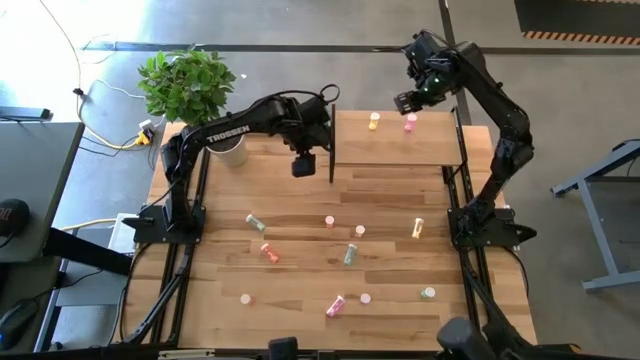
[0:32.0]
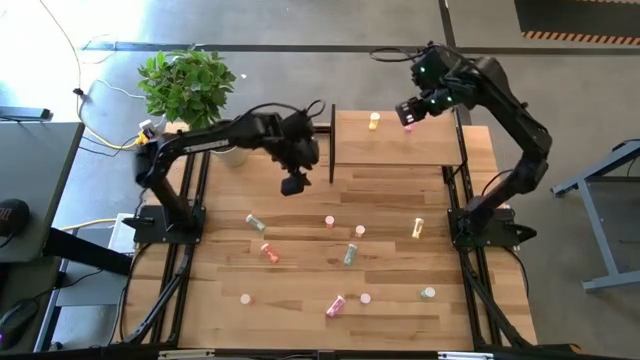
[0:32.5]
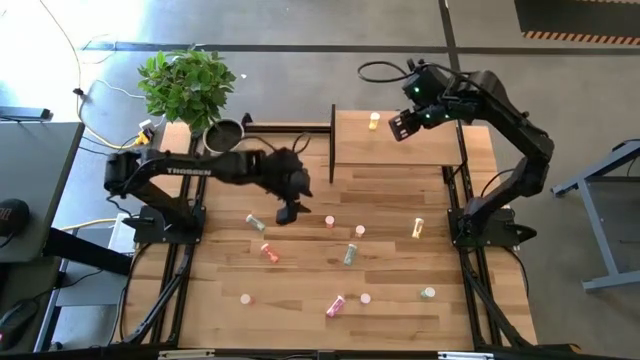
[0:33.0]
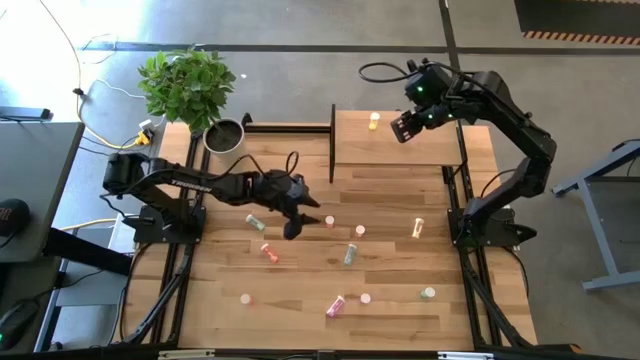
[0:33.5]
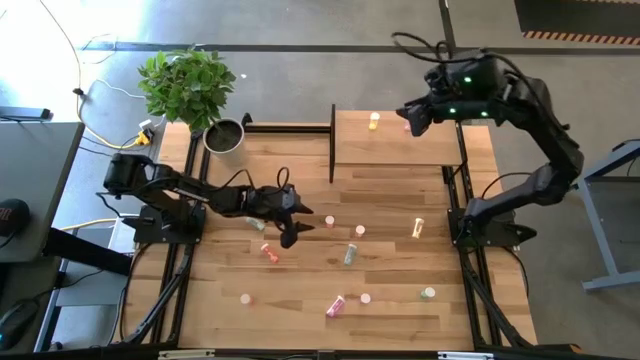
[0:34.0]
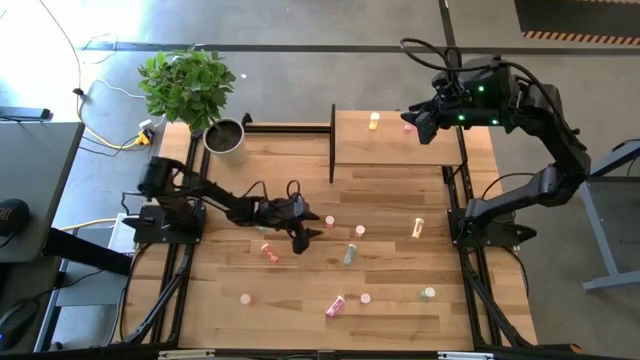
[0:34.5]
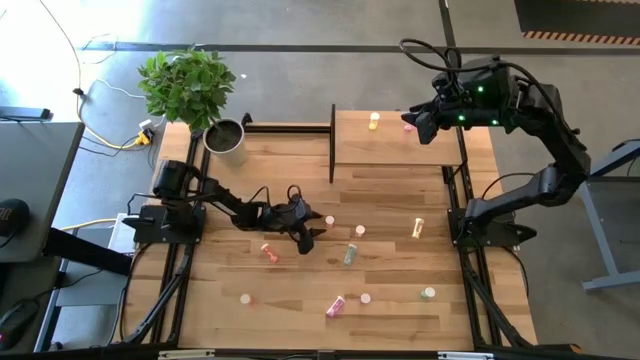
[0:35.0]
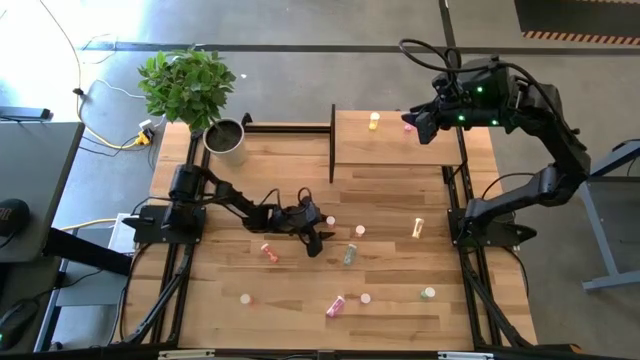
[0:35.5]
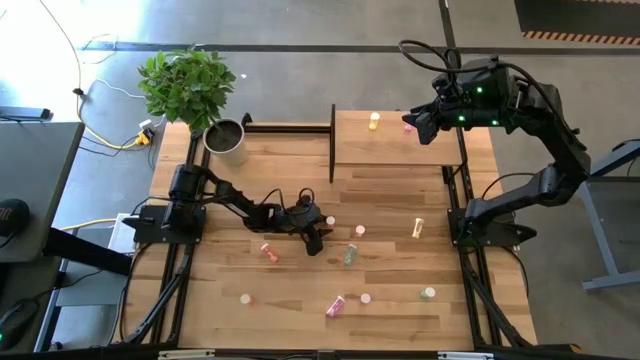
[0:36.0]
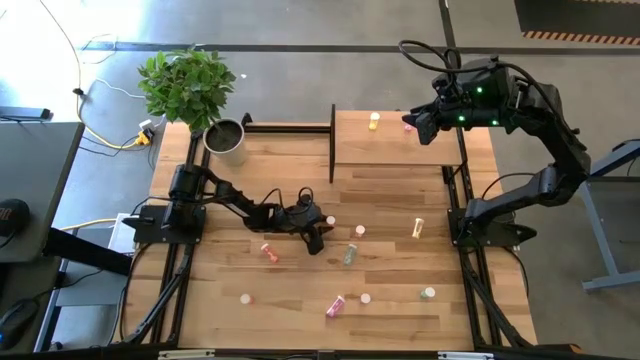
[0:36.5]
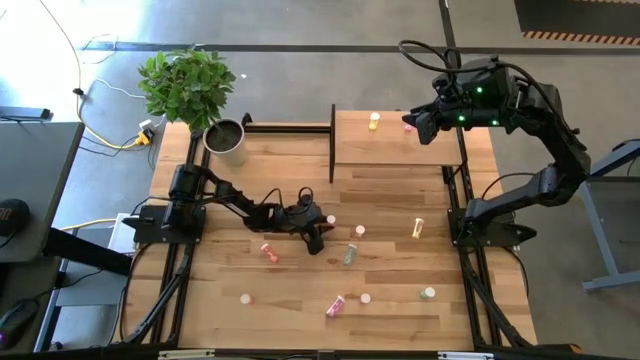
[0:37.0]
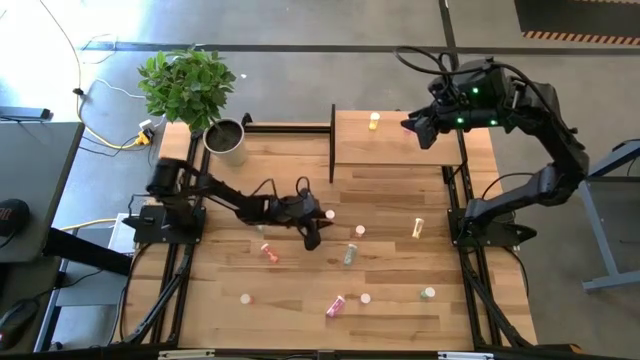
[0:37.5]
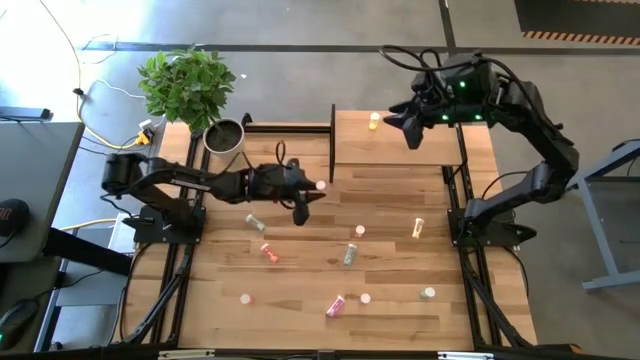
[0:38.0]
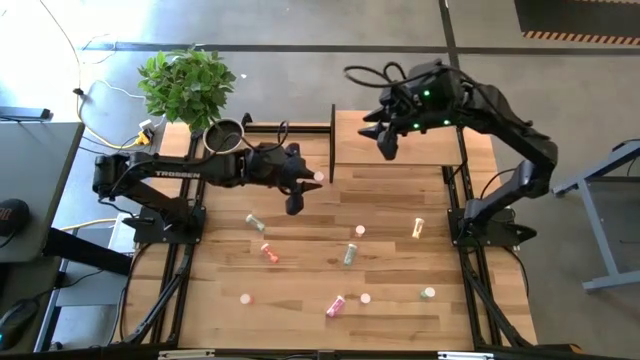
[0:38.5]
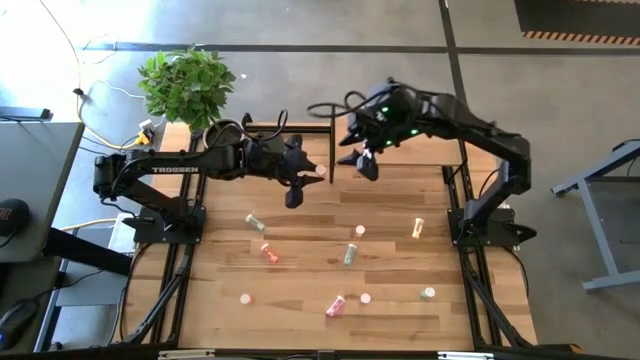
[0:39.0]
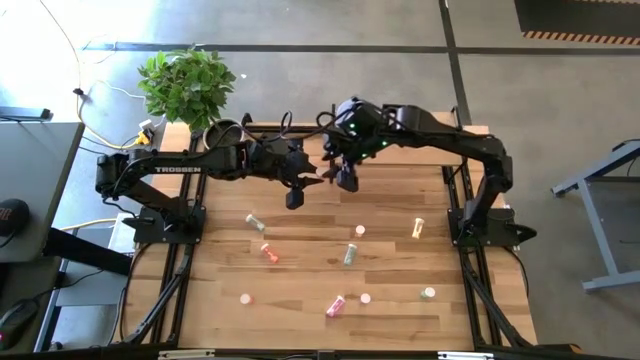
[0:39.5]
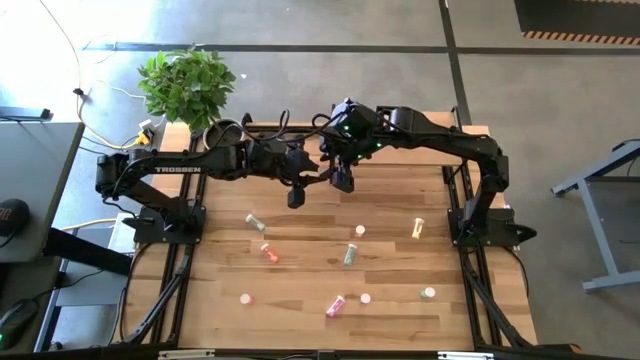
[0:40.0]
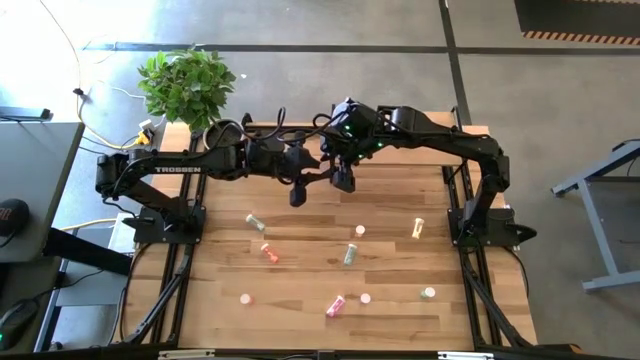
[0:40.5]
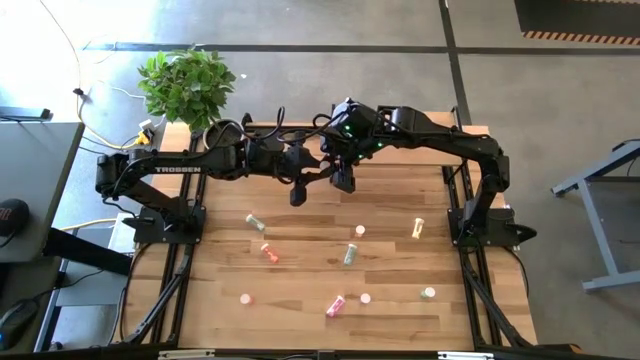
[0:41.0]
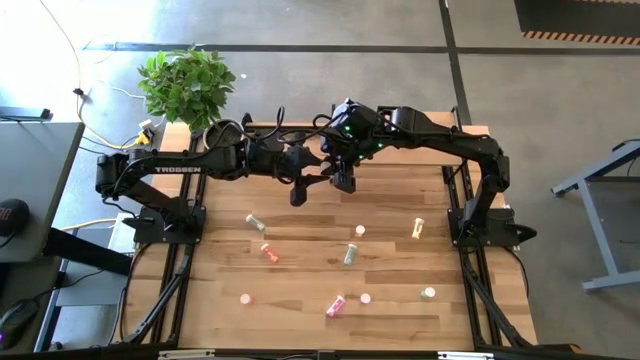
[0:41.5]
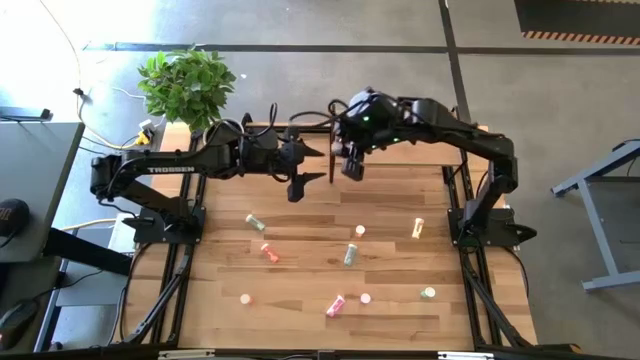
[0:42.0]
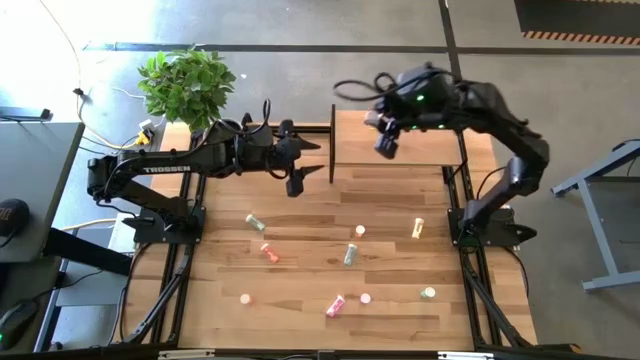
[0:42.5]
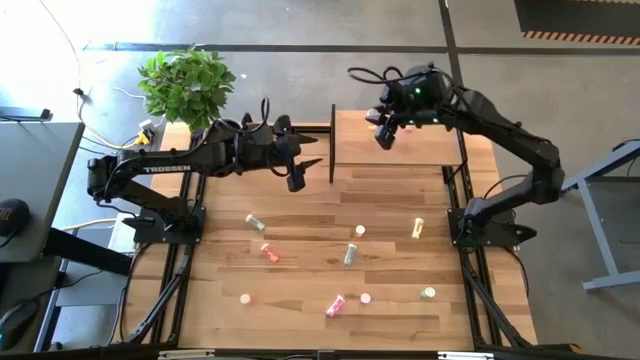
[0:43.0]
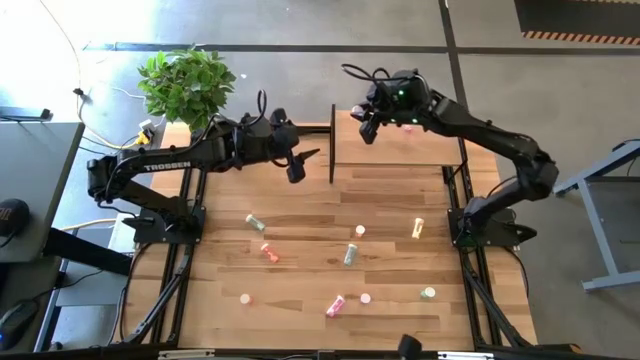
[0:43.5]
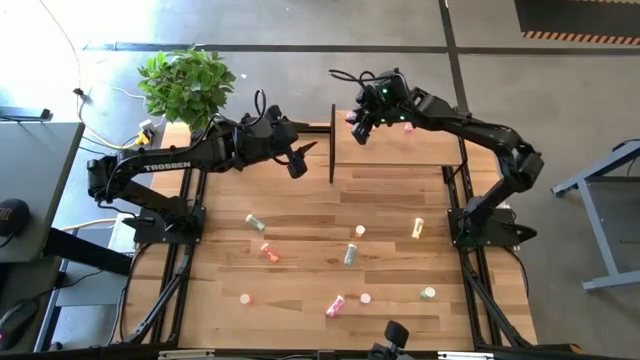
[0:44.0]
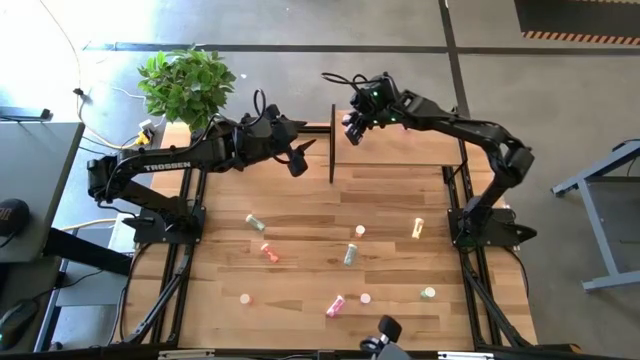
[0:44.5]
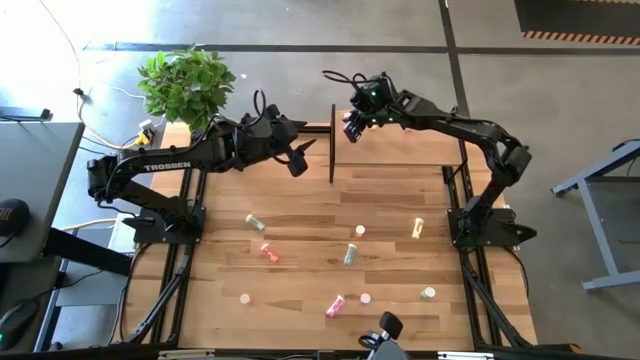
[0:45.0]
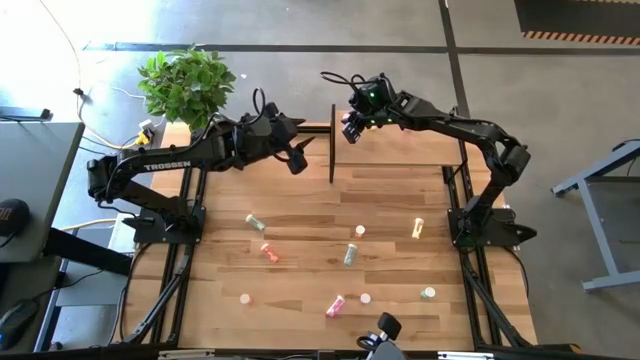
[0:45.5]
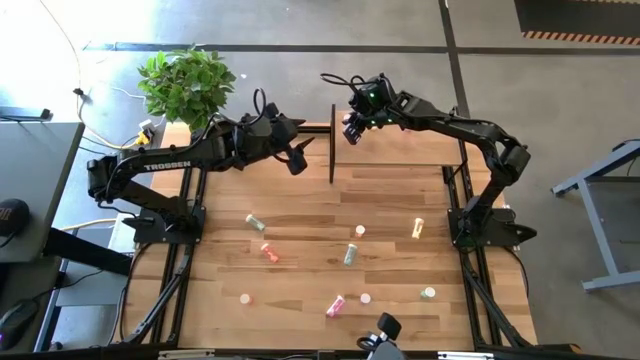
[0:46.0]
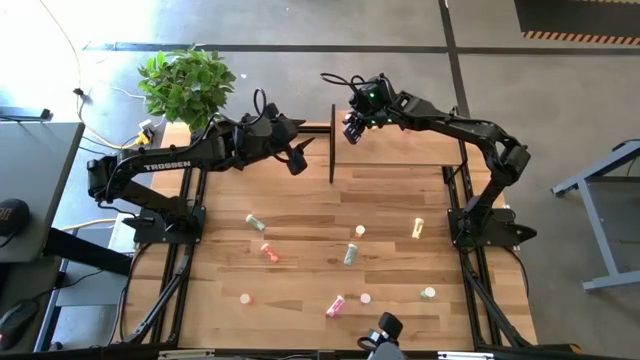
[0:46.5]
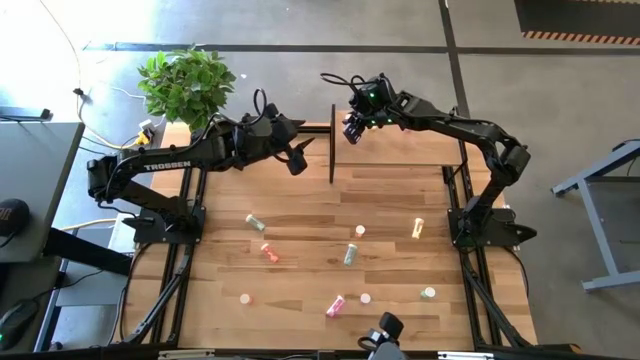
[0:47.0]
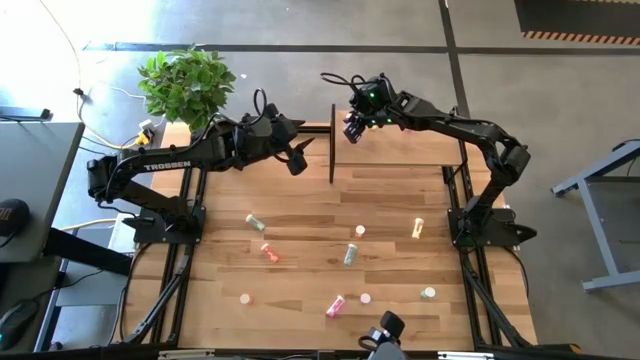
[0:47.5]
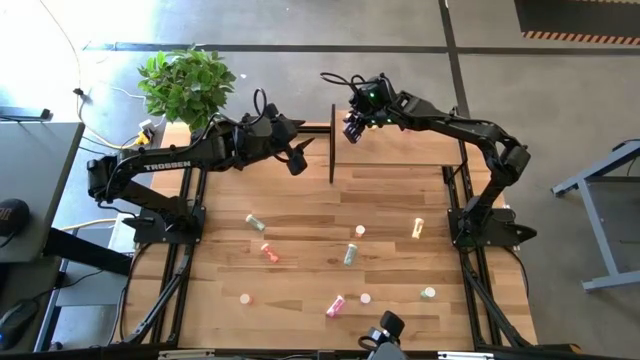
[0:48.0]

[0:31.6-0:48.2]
Task: Pick and place medicine bottles onto shelf by color
Put the top pink medicine bottle on the shelf

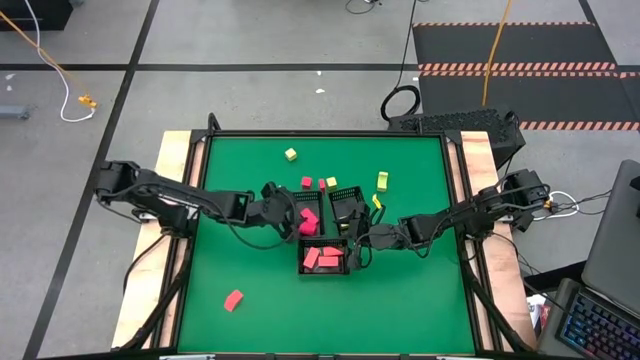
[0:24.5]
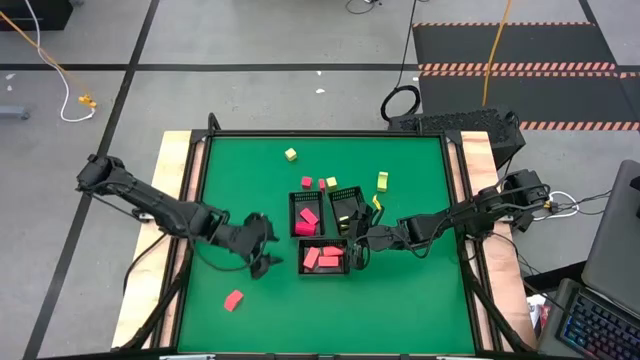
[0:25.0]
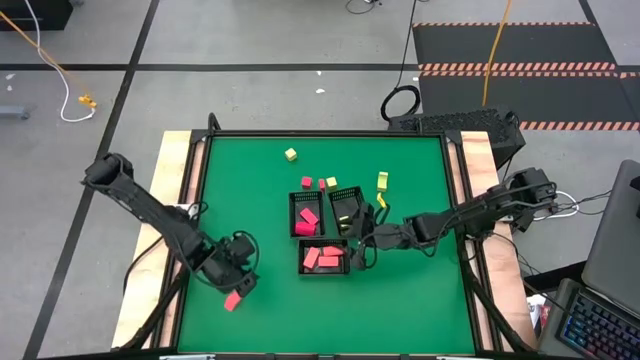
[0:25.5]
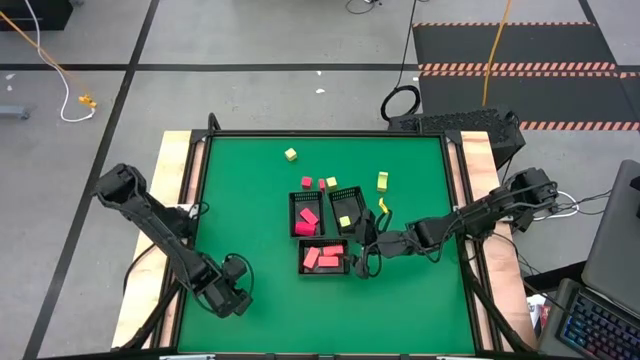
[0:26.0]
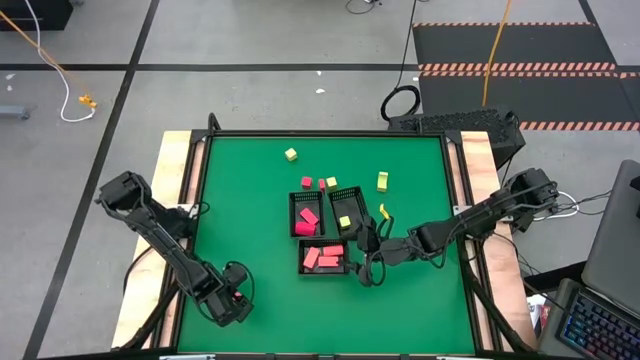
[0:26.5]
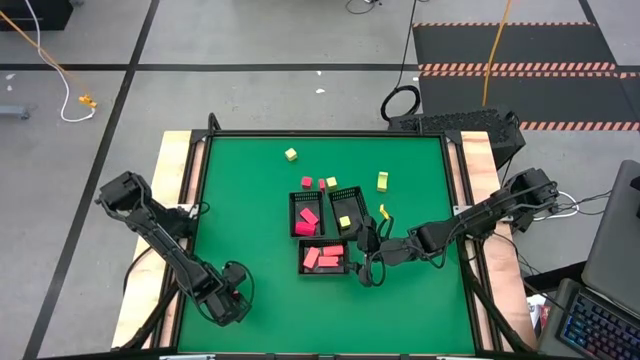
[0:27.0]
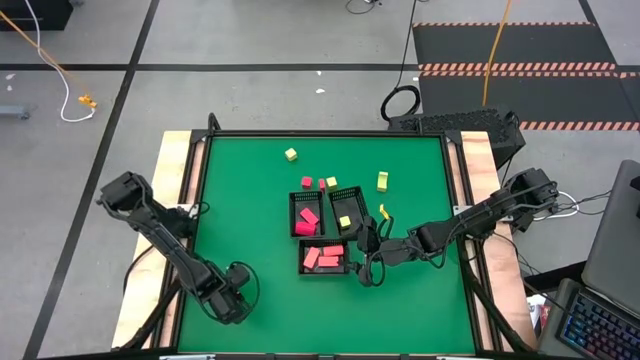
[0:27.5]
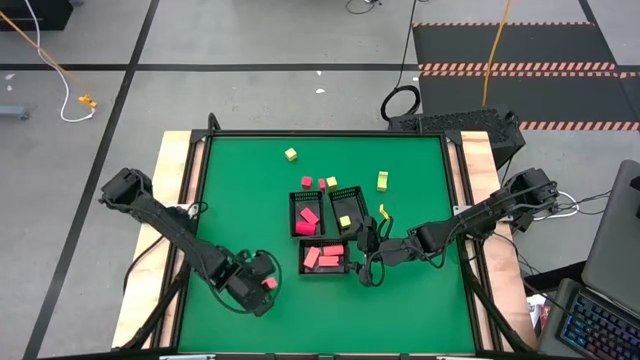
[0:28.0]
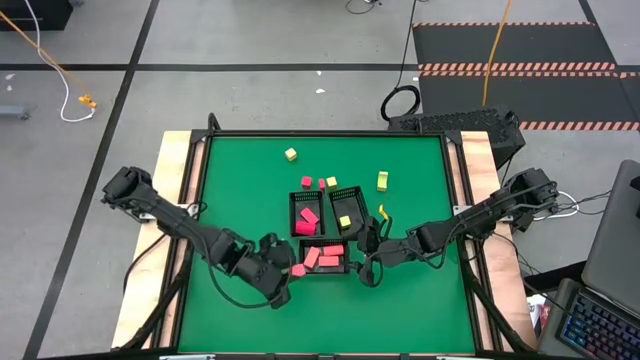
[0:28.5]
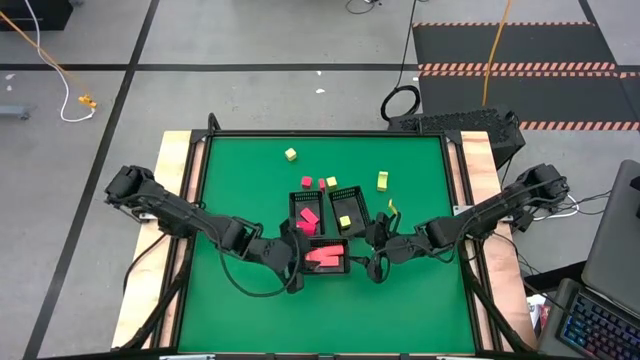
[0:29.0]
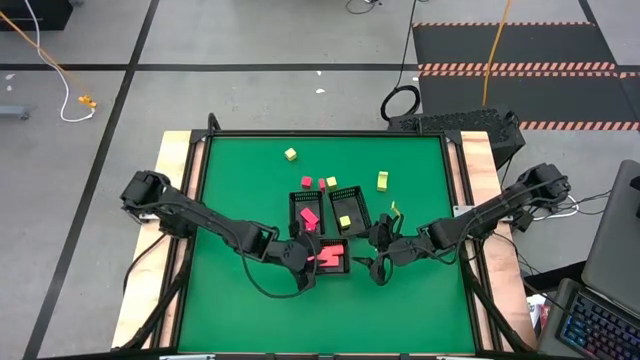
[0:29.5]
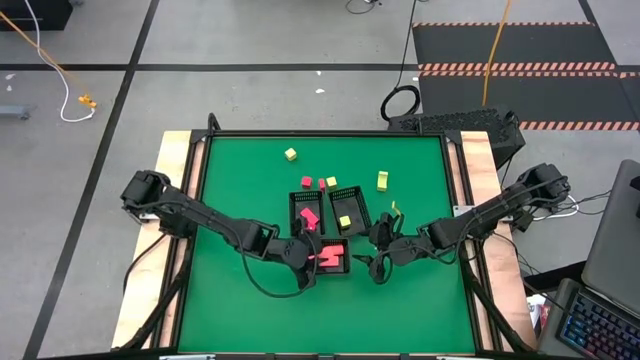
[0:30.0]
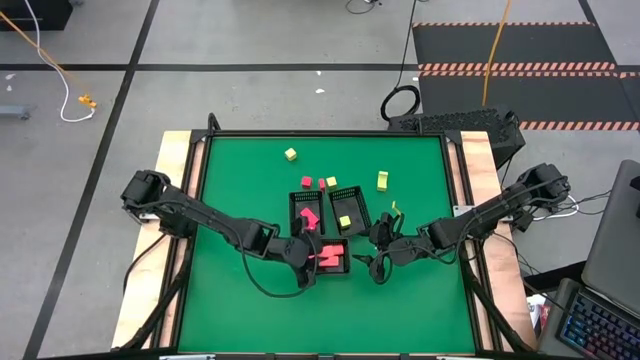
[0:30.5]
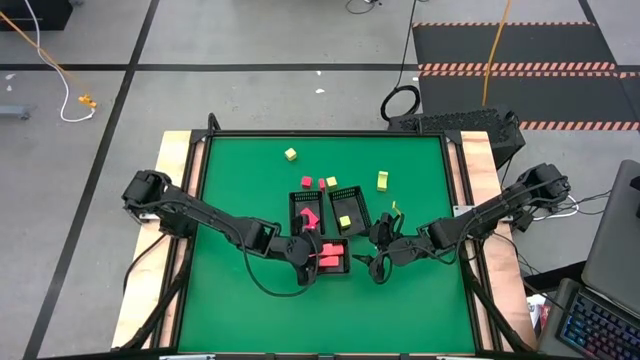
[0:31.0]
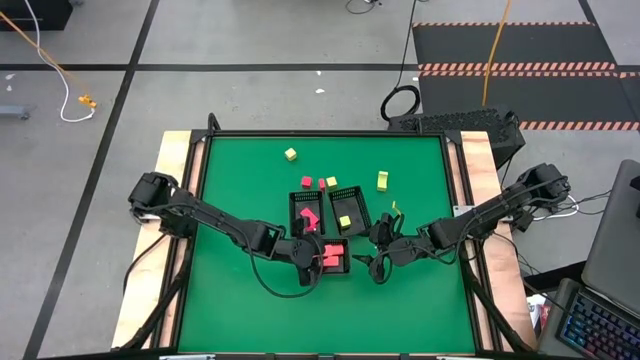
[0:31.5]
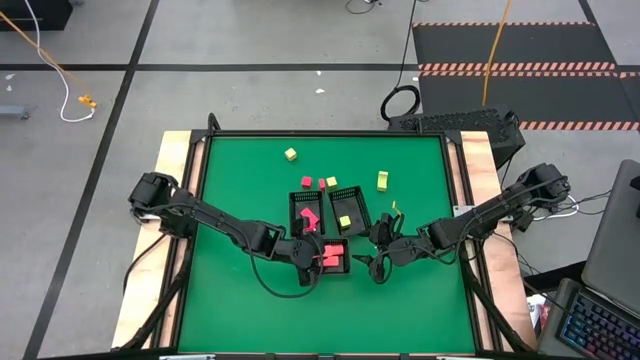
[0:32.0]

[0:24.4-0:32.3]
Task: Sort & place blocks by color
Put the orange block into the bottom black bin
